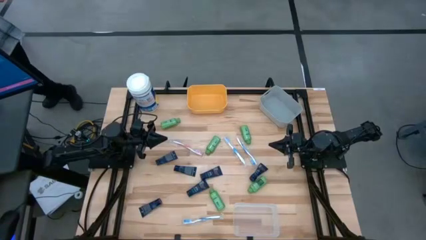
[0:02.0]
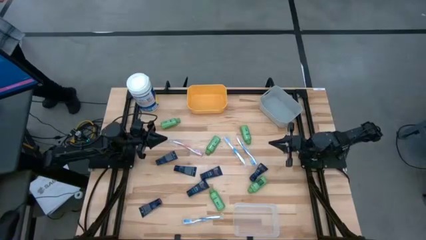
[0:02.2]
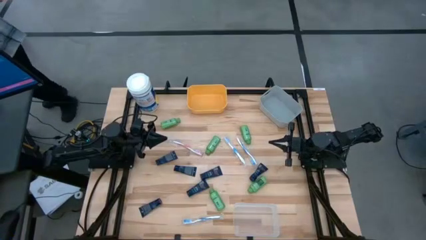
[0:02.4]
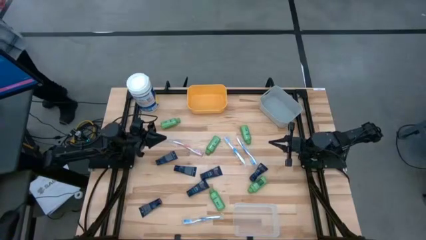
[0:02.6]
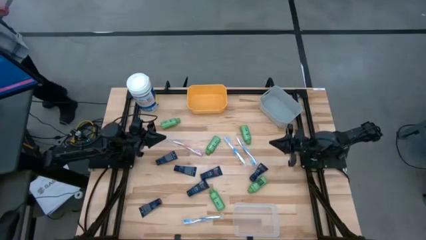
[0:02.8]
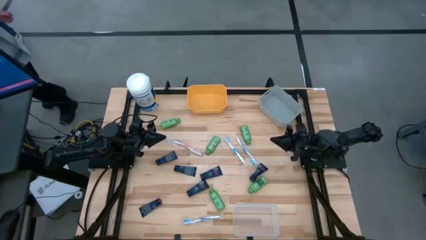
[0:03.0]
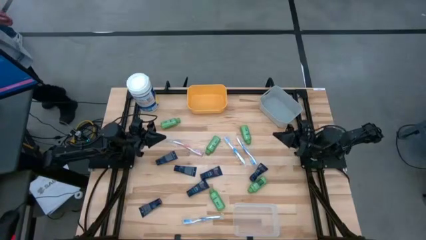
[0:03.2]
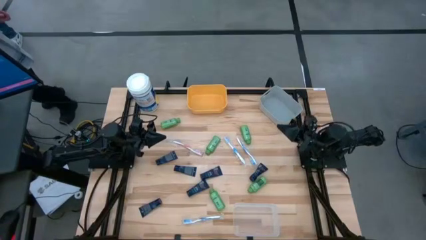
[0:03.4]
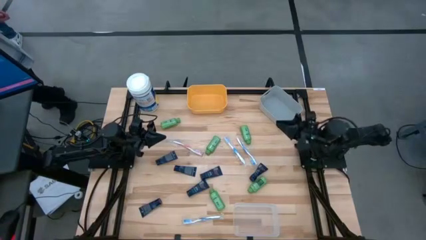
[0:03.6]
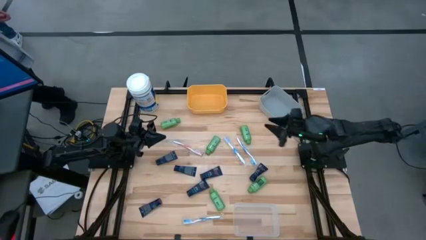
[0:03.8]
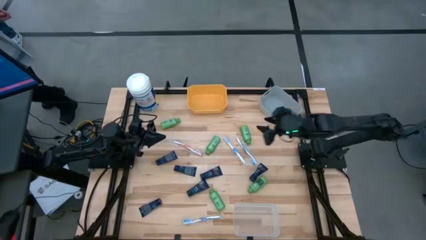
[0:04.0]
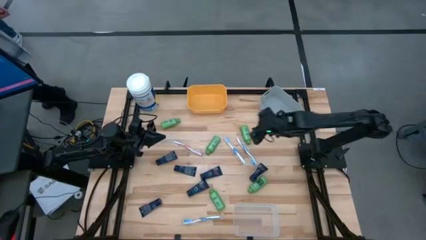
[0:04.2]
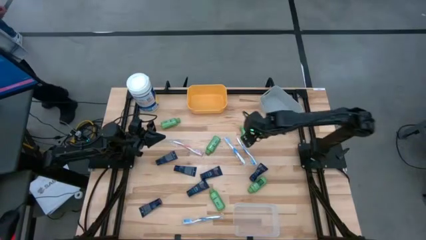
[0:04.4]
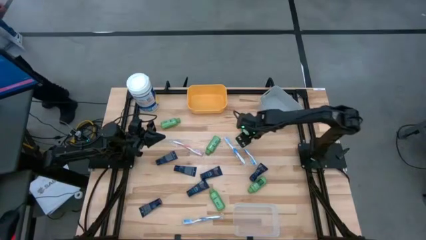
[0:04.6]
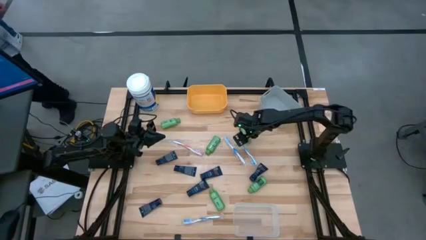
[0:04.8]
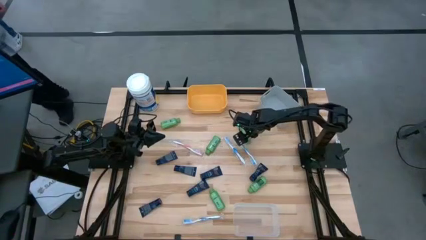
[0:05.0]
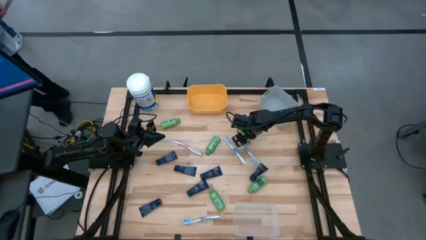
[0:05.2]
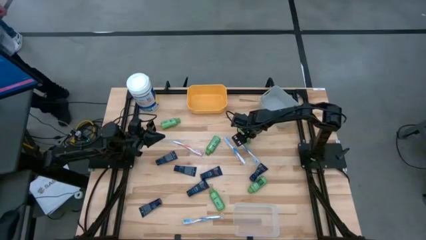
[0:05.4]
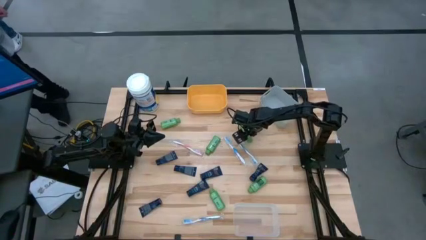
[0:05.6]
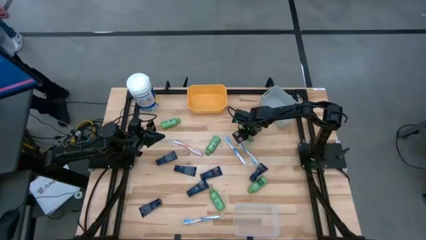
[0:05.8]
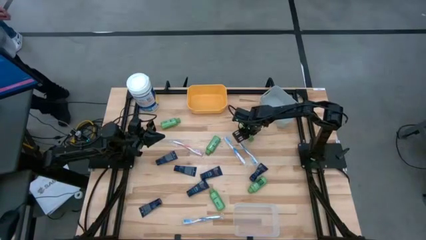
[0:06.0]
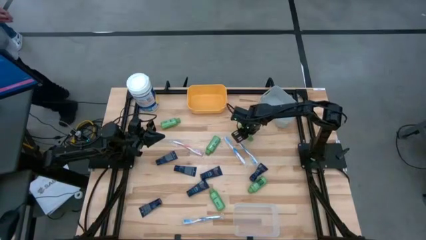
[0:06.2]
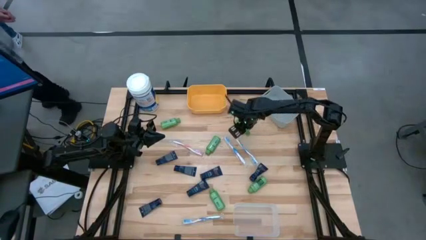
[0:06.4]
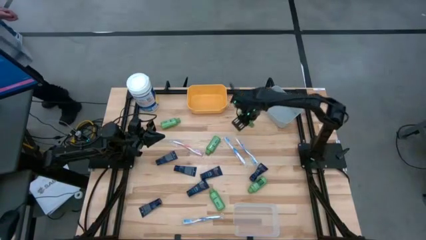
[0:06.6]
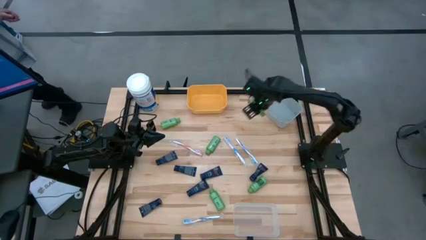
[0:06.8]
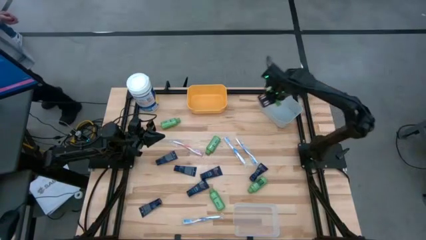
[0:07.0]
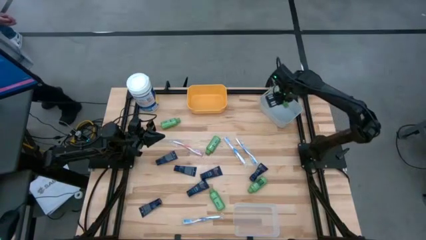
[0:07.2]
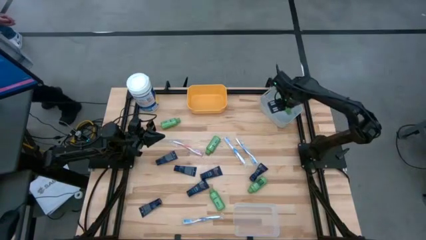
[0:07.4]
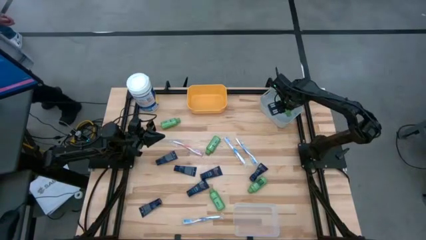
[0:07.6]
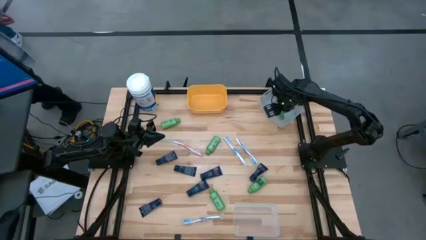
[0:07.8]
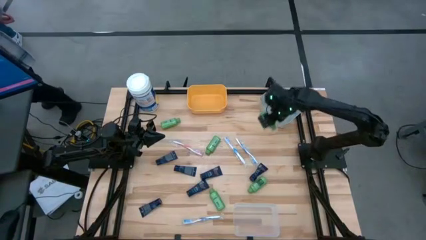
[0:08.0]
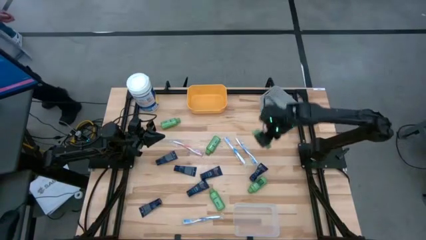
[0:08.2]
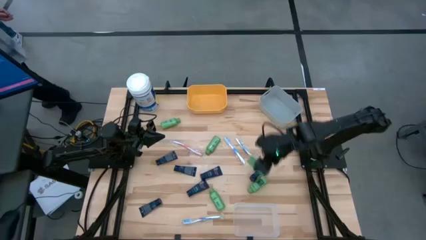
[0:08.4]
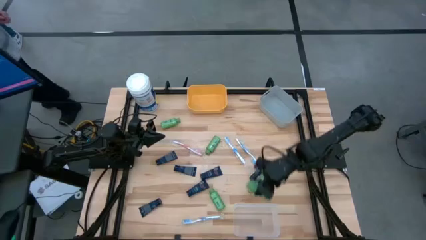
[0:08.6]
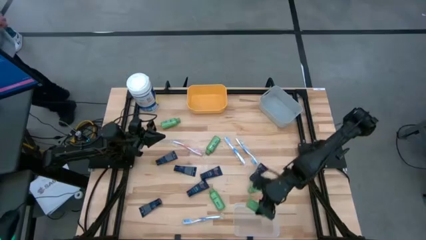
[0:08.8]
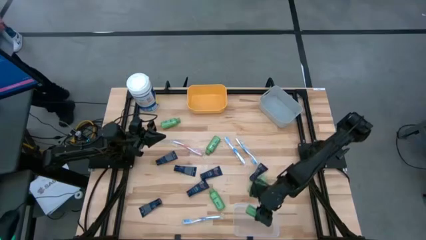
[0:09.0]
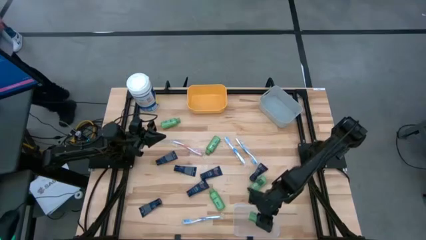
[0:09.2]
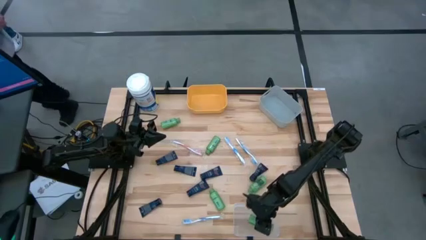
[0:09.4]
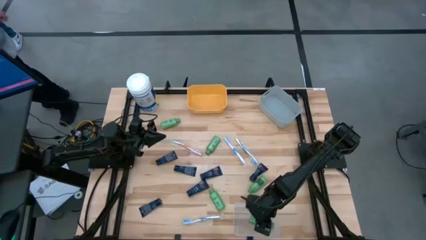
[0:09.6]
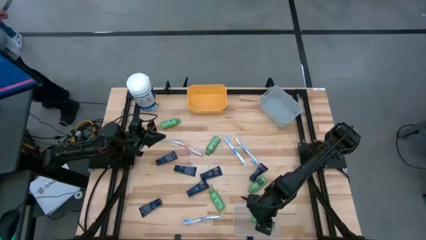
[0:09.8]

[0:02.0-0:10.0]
Task: Pick & Place Travel size toiletries
Put the green shampoo into the transparent bin

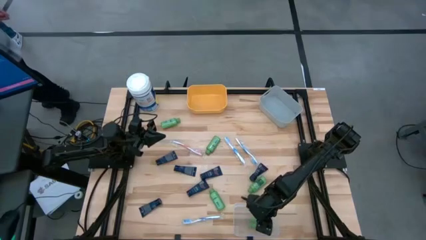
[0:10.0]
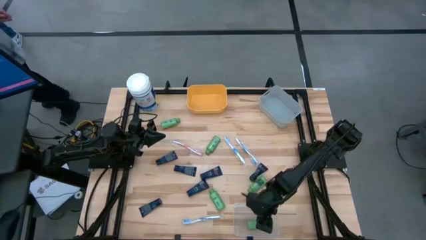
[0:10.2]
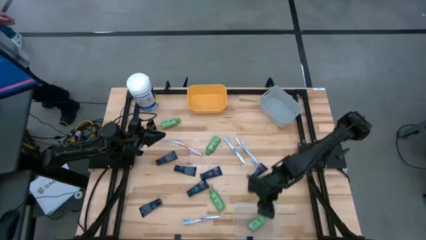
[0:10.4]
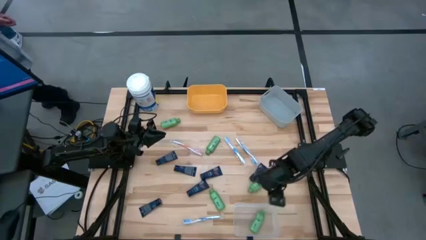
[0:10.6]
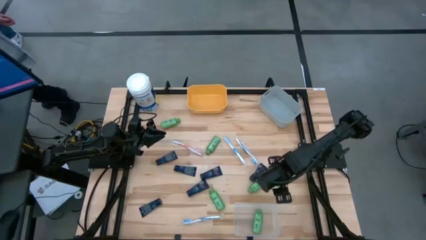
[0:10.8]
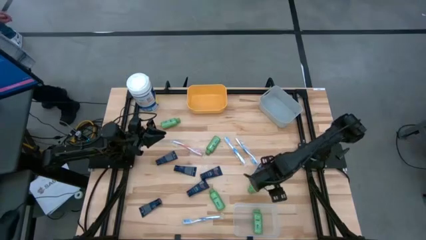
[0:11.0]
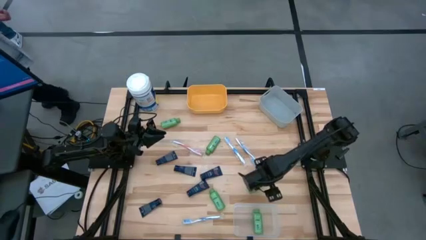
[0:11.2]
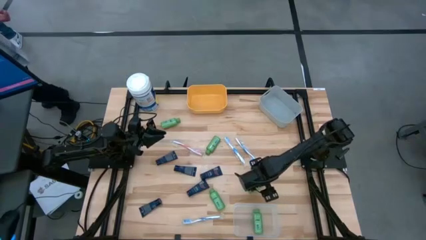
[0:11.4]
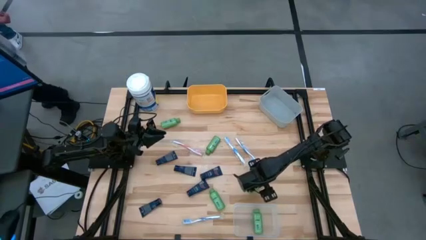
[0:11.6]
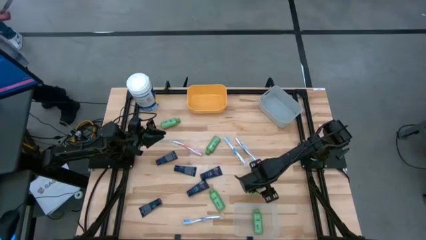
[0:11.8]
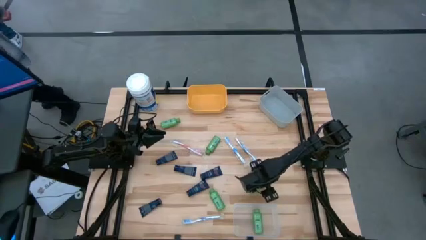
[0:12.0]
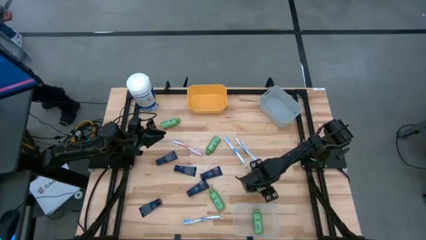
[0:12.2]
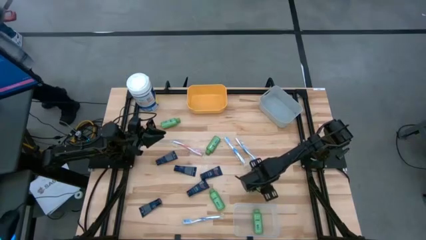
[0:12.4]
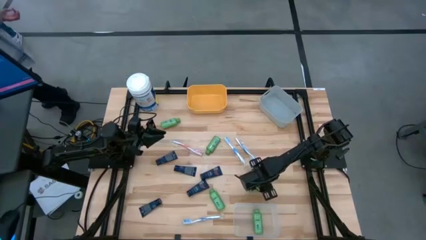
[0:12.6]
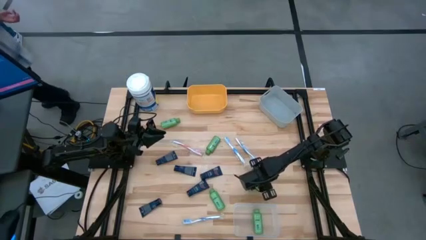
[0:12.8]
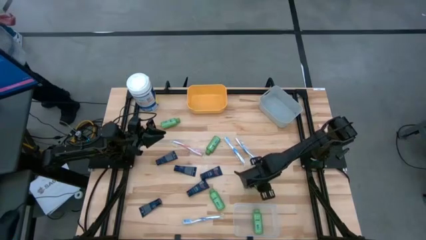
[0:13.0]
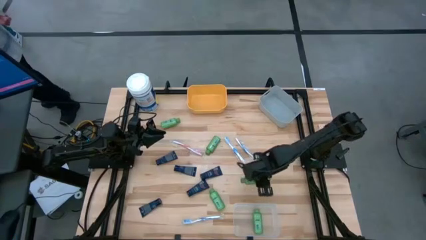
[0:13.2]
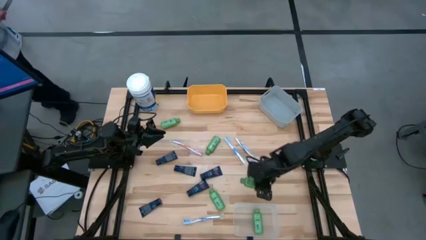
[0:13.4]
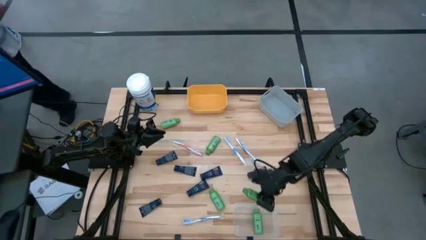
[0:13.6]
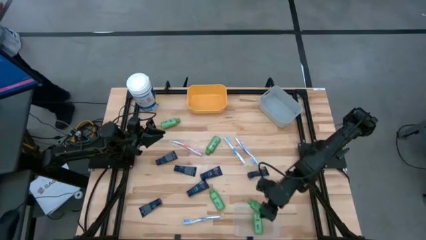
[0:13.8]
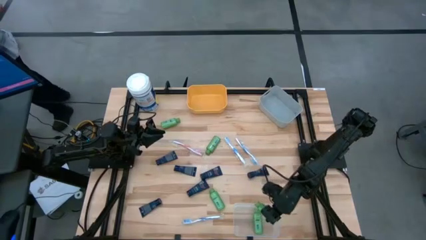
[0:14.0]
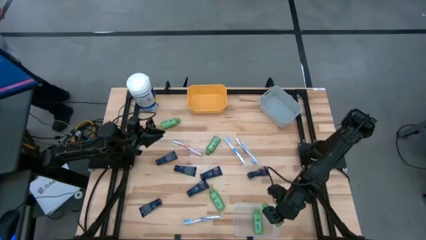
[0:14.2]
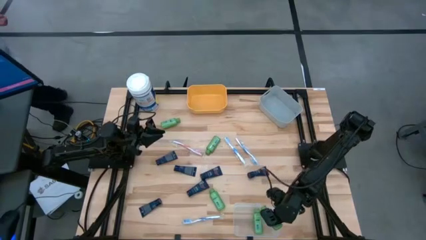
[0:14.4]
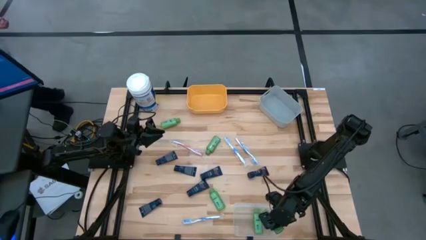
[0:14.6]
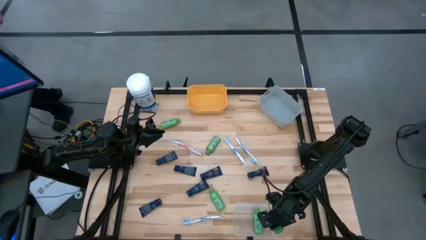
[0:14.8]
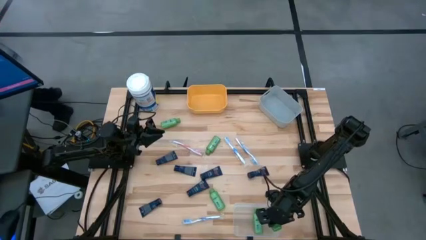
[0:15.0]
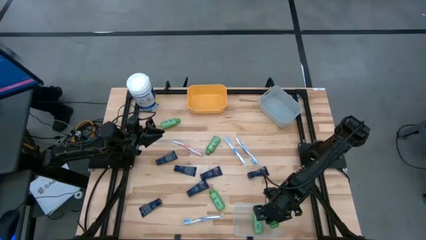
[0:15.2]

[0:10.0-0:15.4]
Put the green shampoo into the transparent bin

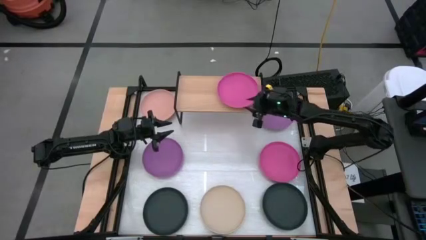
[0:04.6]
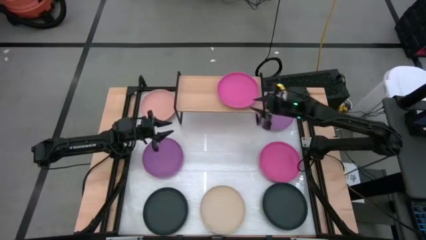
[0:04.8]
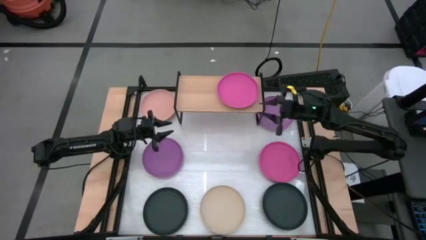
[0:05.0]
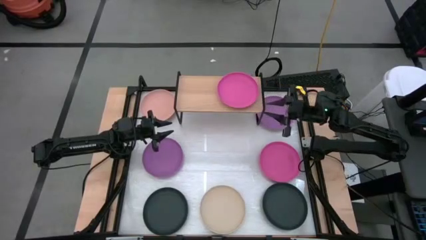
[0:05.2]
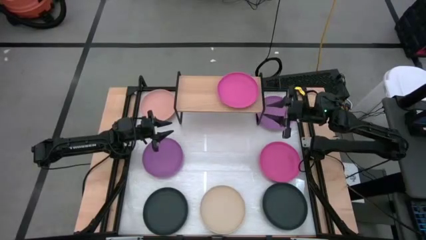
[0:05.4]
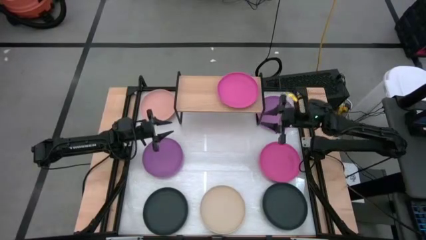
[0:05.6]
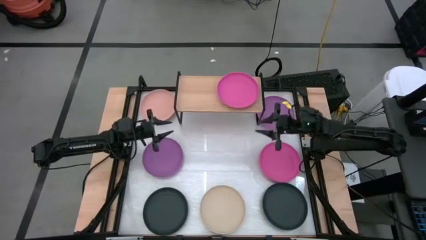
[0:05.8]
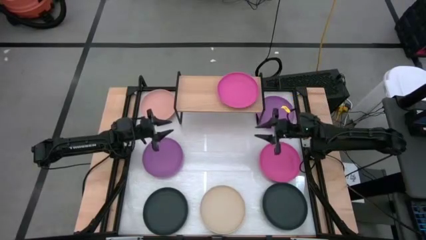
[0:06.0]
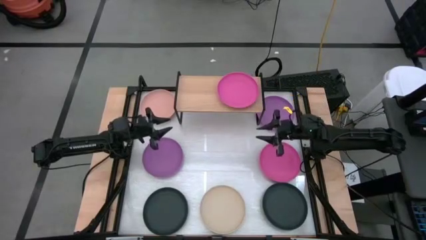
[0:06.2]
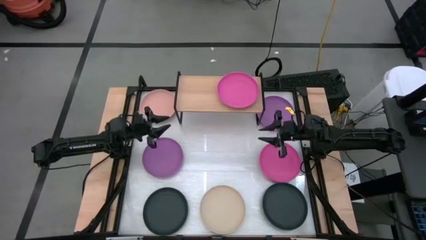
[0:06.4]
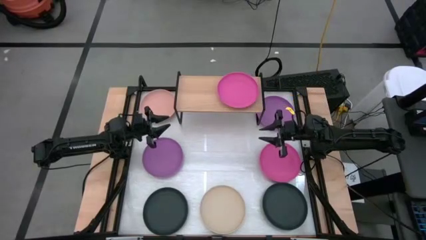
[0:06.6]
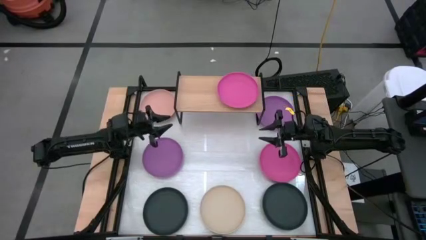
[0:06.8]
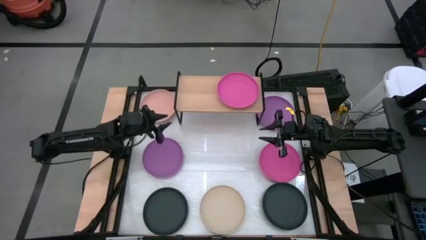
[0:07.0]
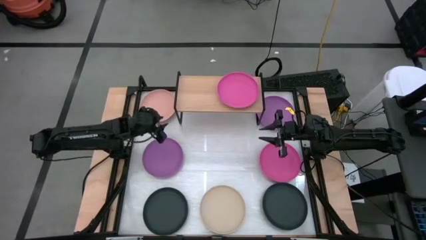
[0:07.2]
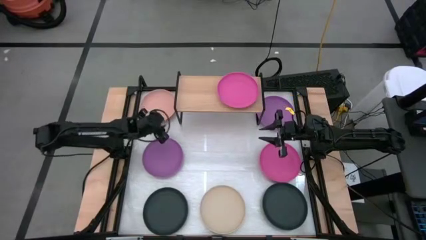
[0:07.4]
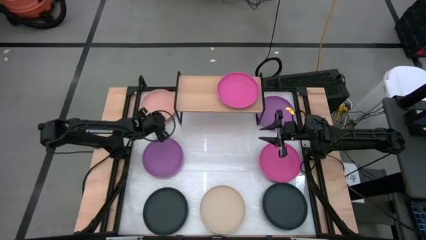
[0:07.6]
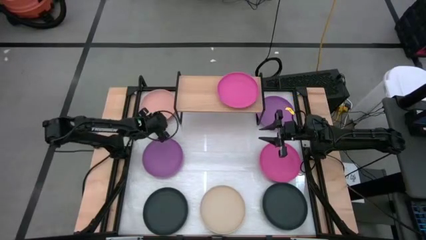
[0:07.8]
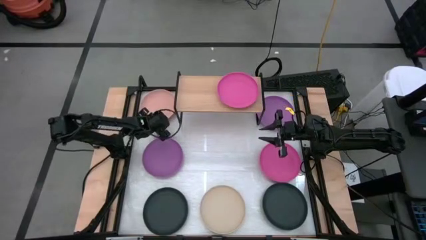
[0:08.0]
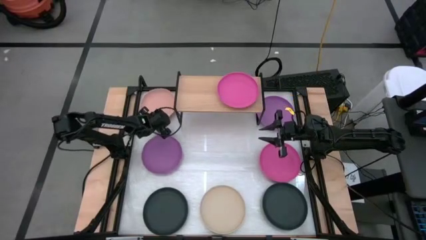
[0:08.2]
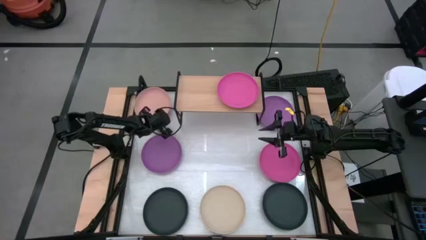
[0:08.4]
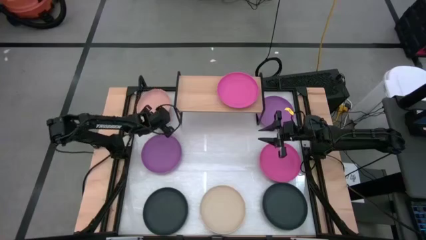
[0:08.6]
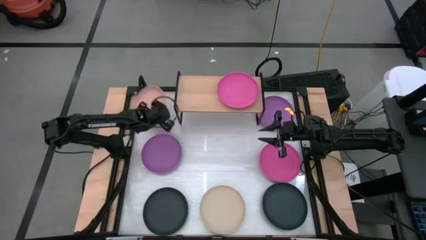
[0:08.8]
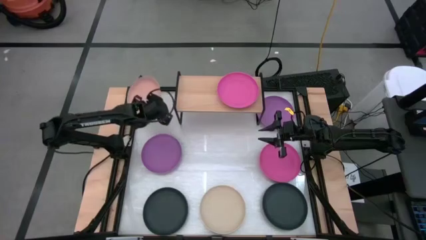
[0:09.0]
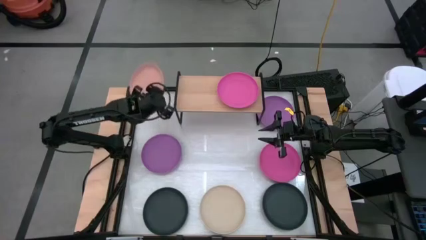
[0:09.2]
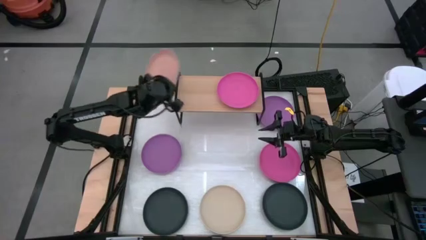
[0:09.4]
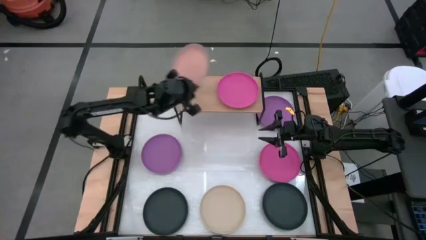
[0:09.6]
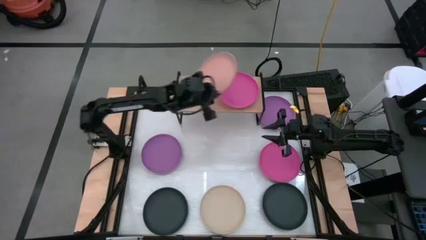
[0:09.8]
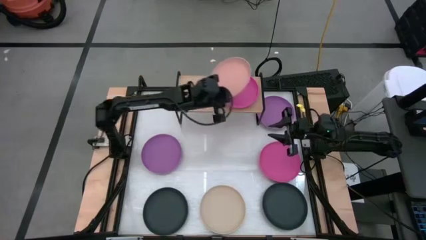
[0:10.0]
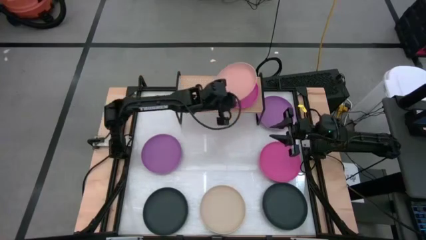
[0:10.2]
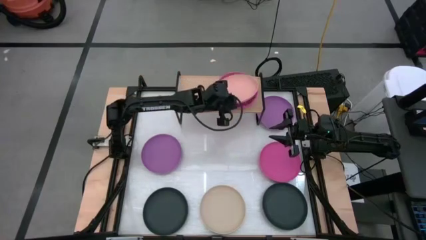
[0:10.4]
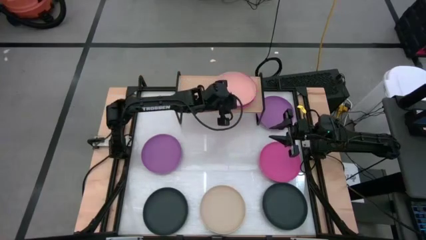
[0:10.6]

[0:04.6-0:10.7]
Task: Place and stack plates onto a shelf
Stack the light orange plate on top of the pink plate on the shelf
